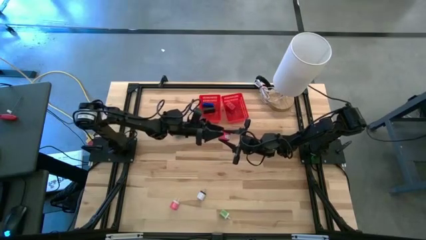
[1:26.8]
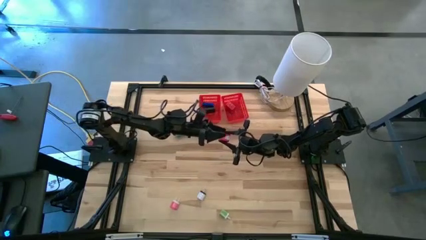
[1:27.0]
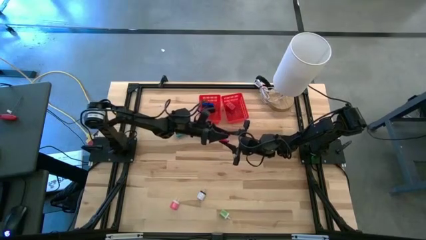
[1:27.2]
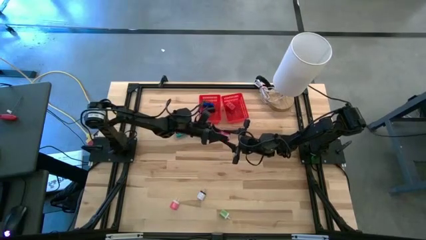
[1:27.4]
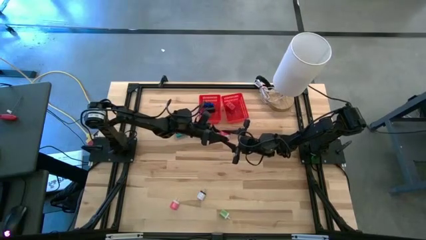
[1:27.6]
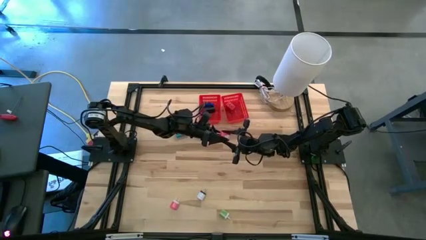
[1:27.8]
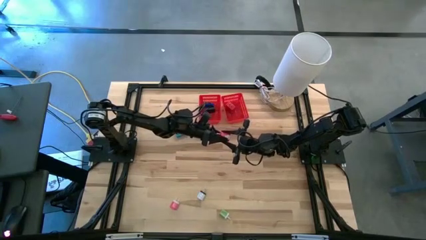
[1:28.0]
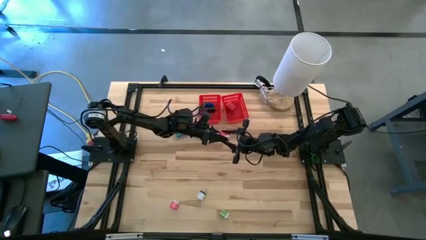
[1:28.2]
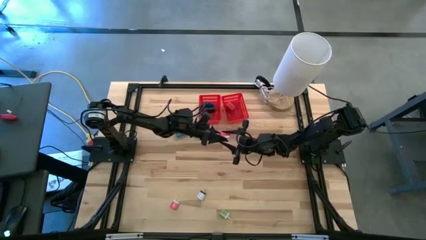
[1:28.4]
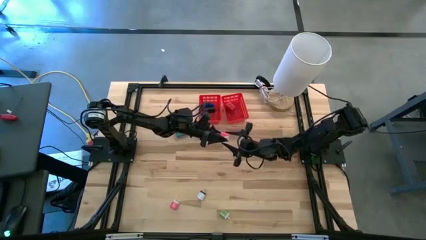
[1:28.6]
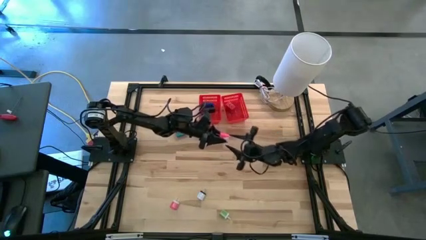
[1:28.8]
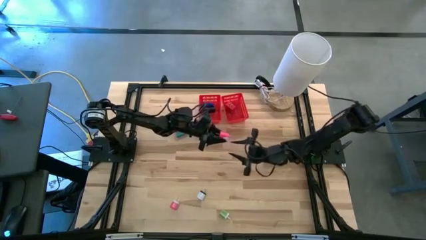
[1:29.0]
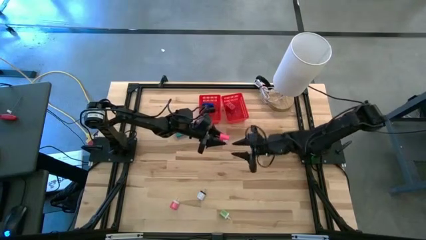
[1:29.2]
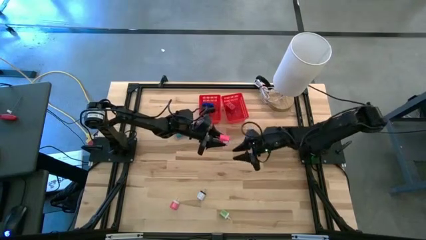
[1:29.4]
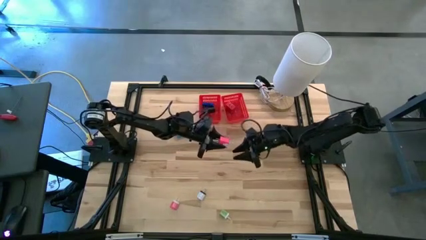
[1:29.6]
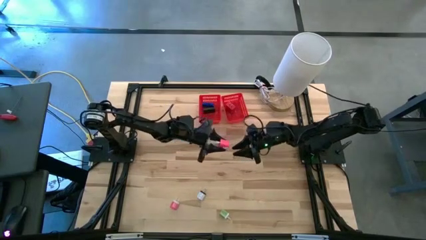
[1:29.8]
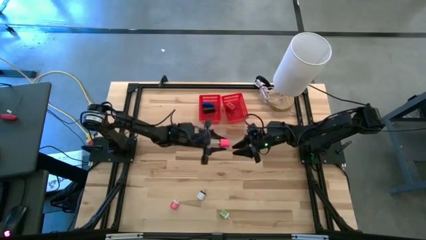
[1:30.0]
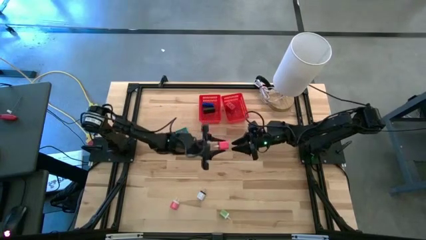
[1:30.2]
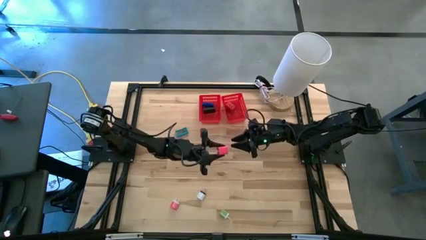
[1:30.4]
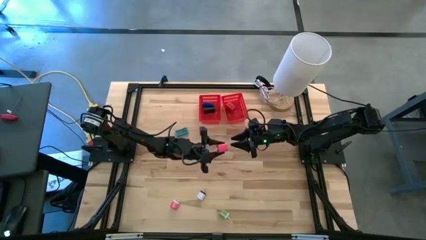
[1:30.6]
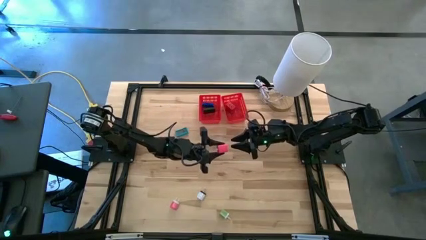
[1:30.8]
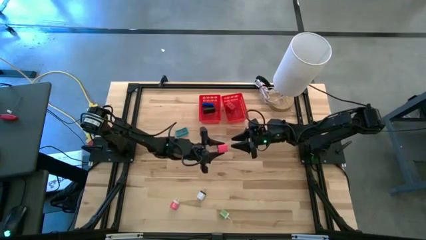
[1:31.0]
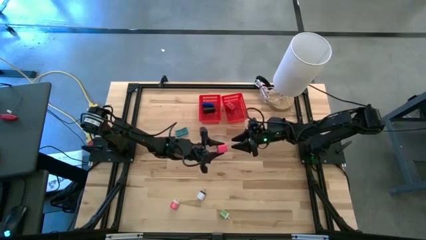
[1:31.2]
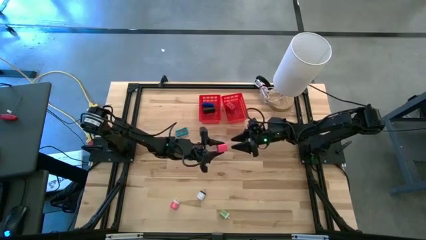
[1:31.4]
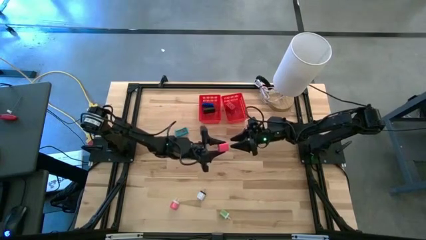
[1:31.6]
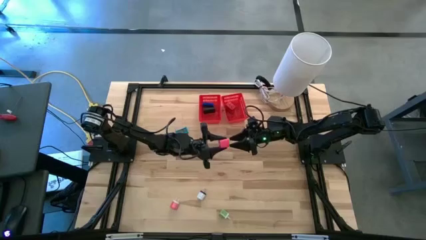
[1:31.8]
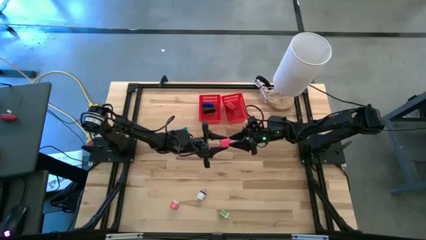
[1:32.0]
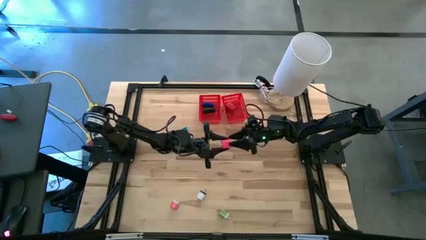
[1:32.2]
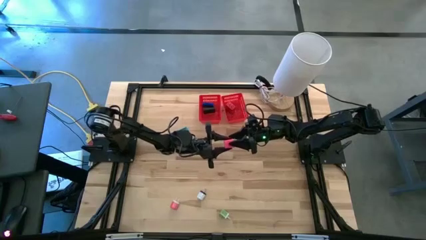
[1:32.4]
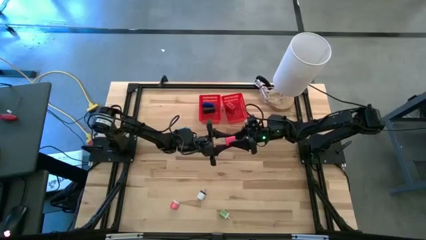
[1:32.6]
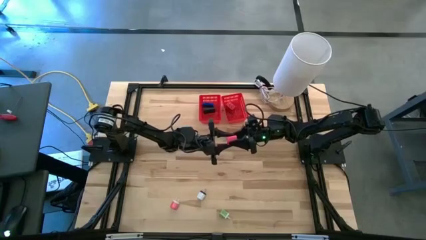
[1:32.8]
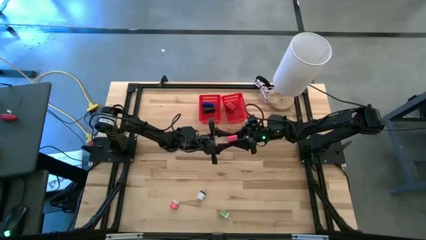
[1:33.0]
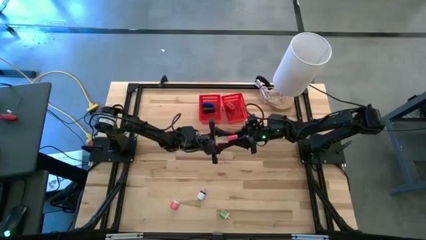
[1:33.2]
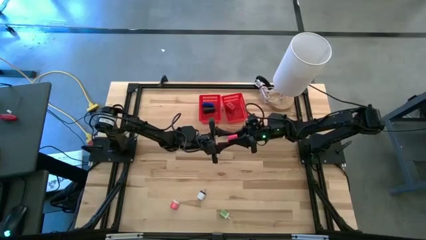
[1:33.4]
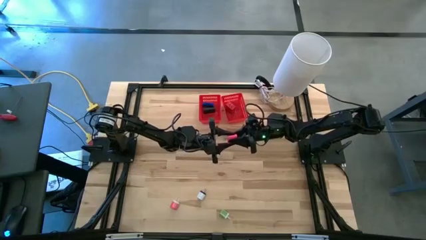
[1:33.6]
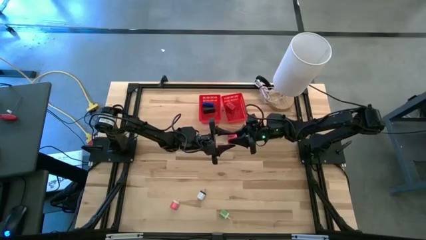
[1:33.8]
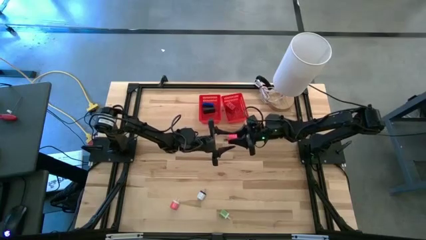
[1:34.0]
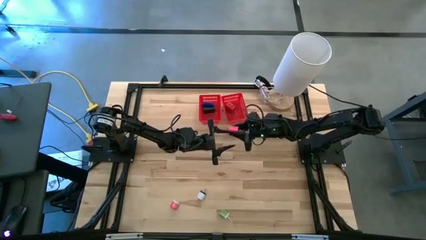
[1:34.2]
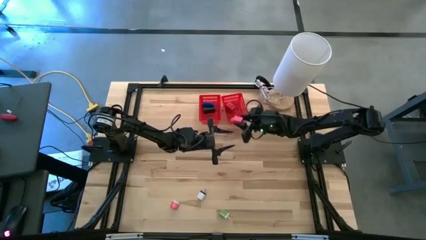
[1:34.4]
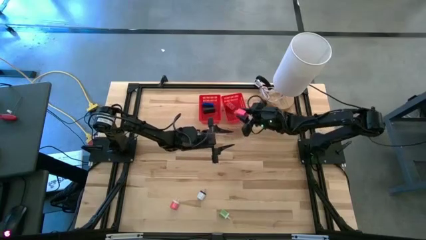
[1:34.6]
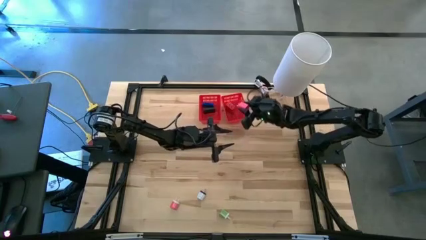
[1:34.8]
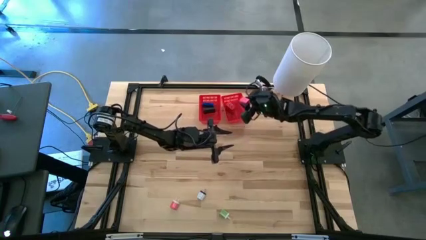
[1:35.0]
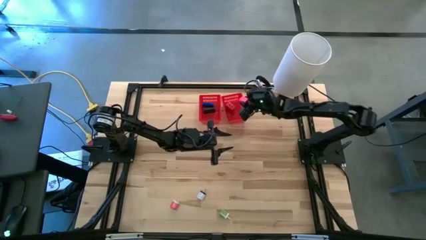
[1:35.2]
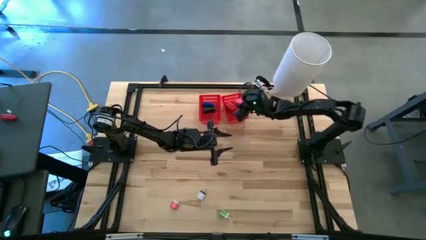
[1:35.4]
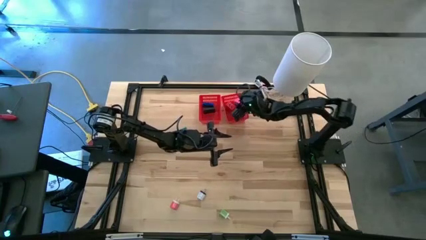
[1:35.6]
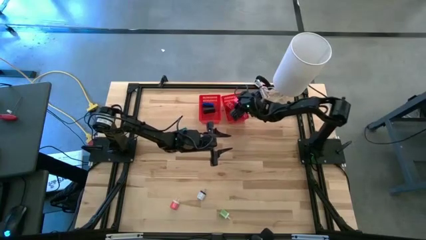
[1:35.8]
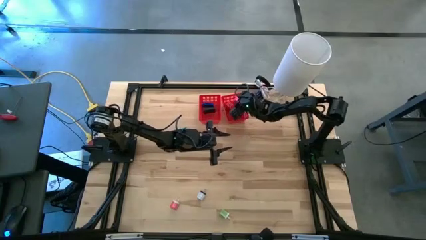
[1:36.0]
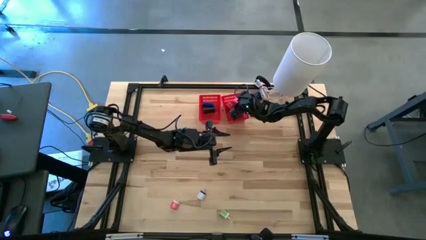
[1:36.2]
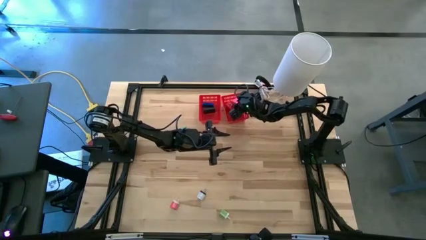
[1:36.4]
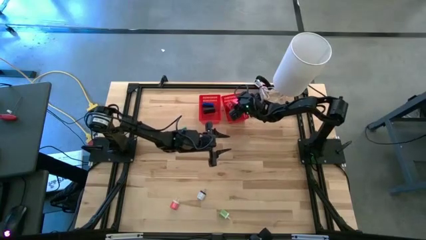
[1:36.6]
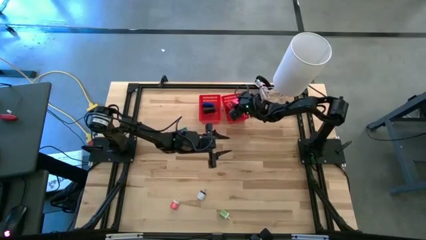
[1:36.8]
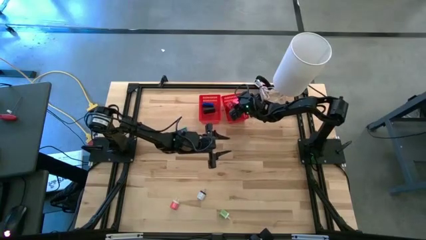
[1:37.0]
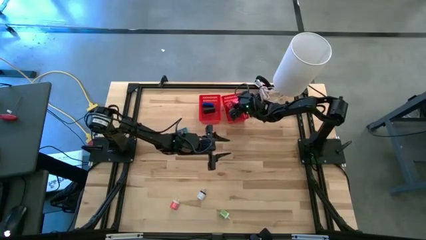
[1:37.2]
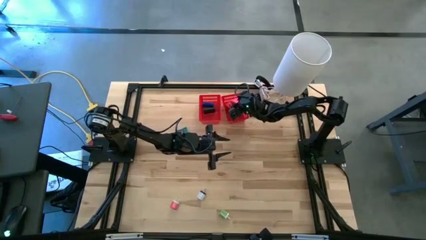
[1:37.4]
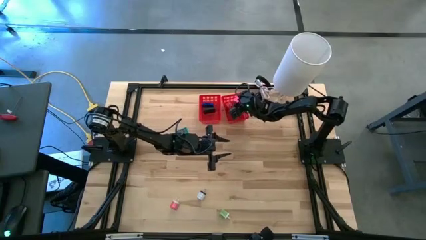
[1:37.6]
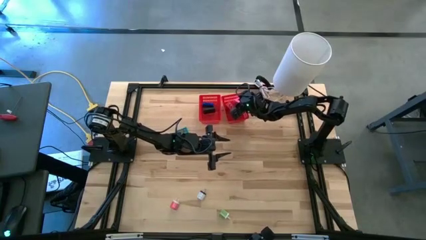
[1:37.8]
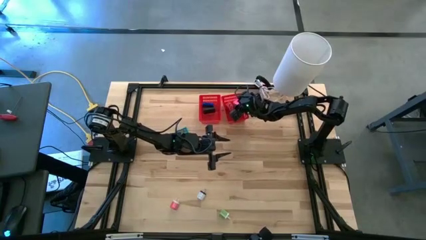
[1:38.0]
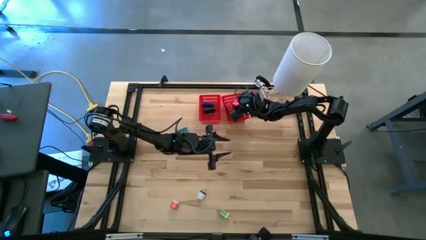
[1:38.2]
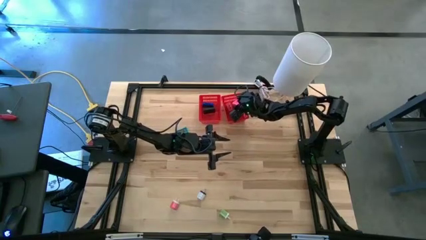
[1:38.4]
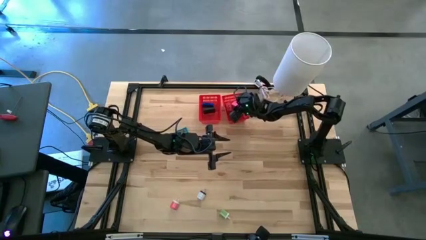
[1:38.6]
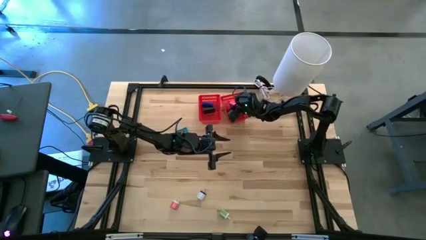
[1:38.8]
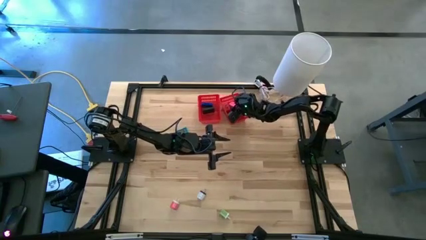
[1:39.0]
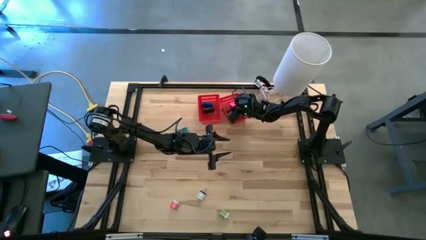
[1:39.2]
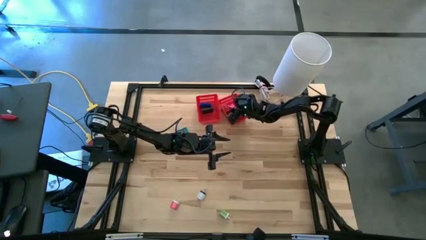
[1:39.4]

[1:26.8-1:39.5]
Task: Pick & Place Office items
Put the pink charger adapter into the right red bin
